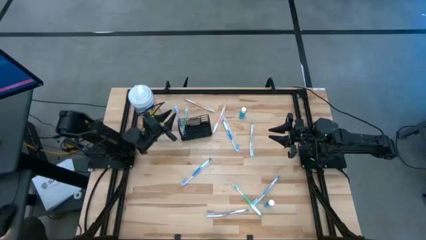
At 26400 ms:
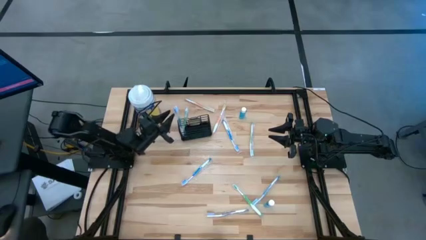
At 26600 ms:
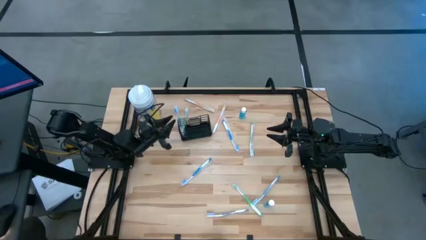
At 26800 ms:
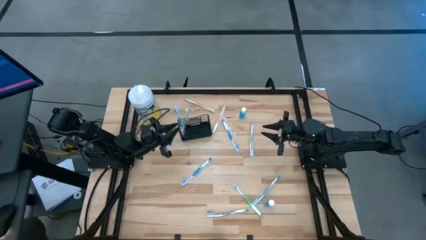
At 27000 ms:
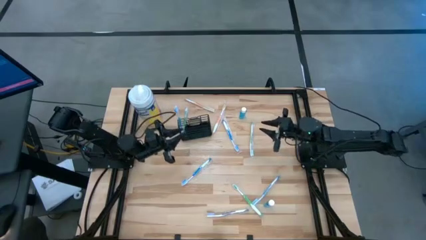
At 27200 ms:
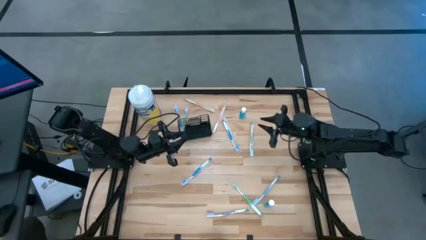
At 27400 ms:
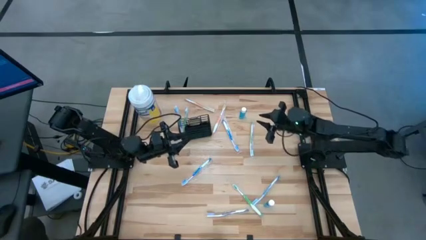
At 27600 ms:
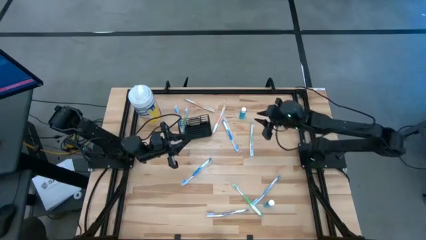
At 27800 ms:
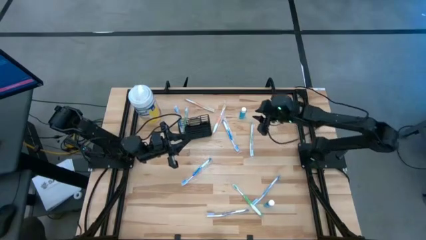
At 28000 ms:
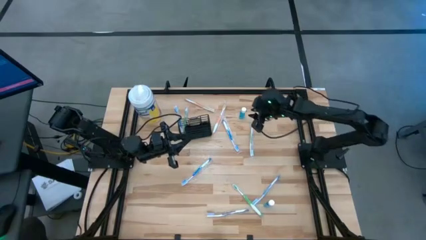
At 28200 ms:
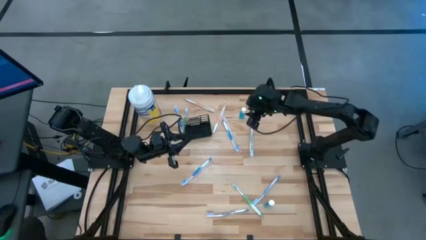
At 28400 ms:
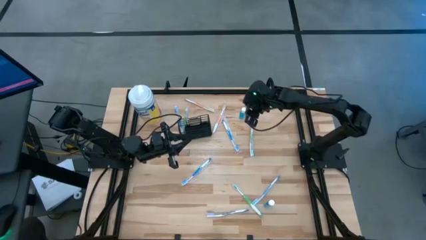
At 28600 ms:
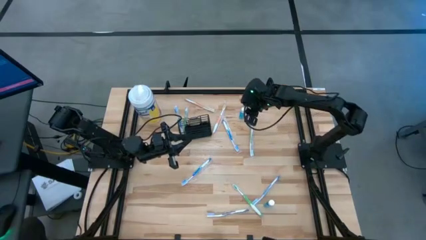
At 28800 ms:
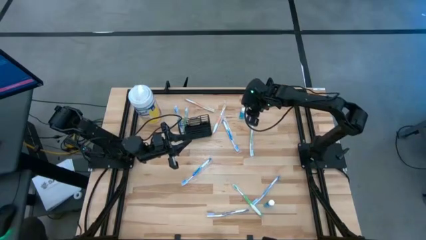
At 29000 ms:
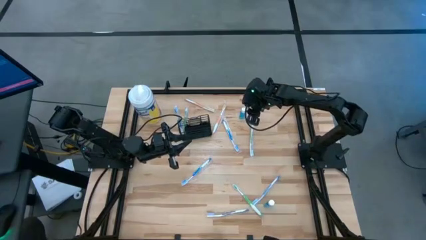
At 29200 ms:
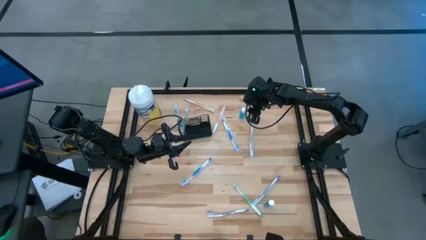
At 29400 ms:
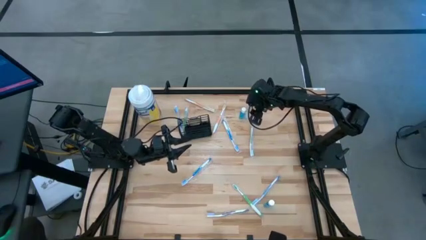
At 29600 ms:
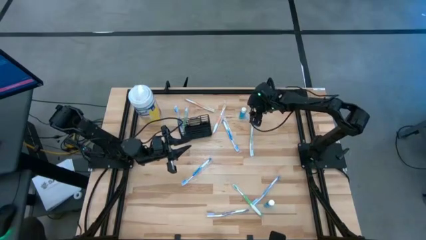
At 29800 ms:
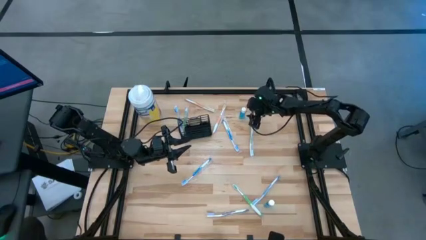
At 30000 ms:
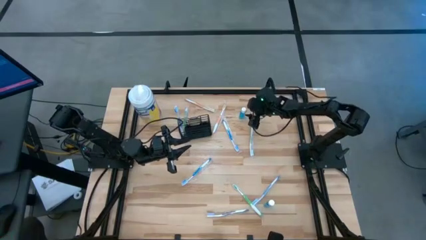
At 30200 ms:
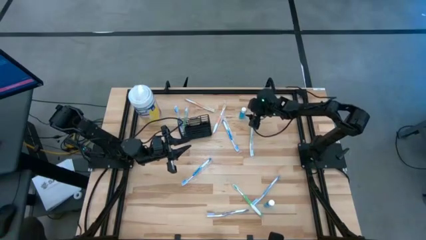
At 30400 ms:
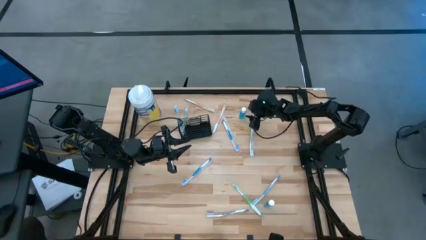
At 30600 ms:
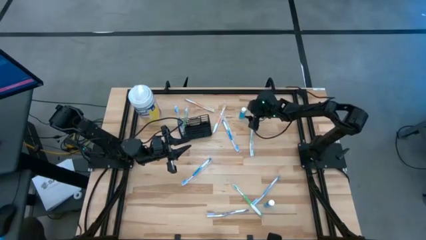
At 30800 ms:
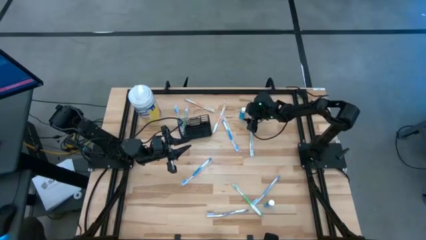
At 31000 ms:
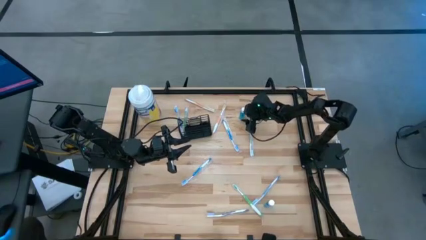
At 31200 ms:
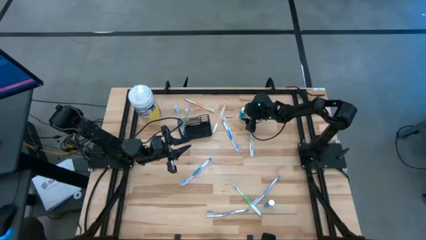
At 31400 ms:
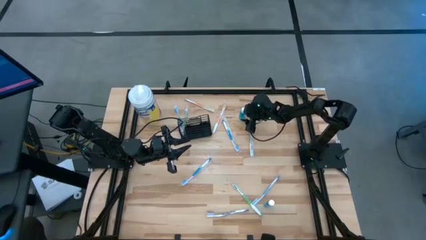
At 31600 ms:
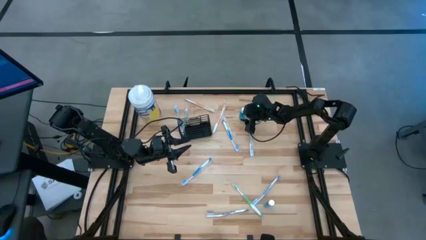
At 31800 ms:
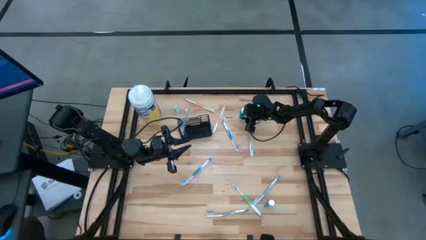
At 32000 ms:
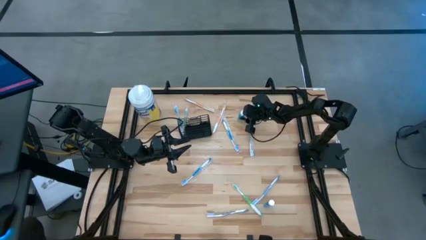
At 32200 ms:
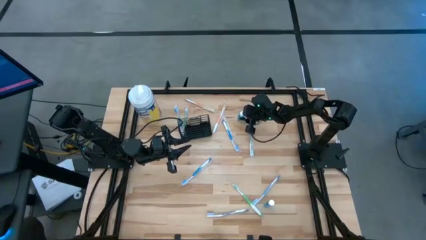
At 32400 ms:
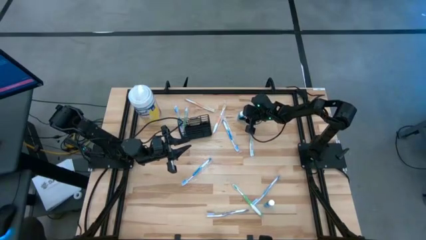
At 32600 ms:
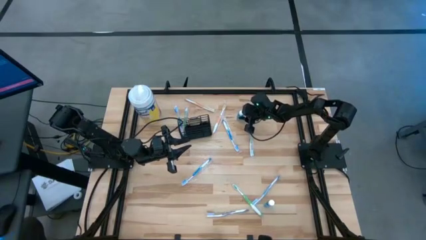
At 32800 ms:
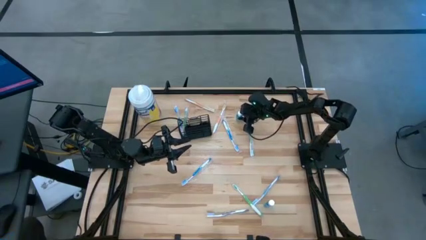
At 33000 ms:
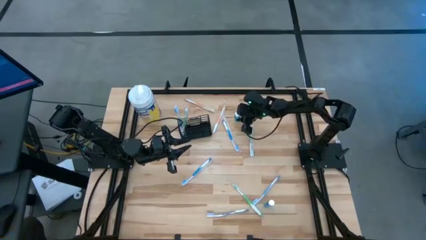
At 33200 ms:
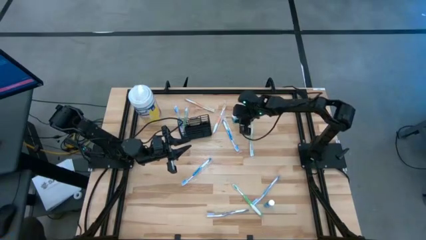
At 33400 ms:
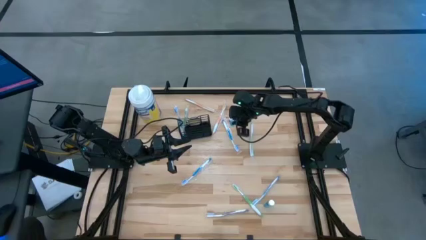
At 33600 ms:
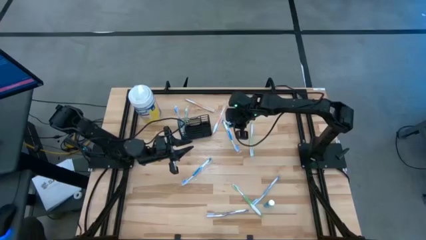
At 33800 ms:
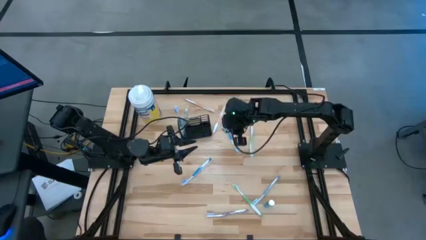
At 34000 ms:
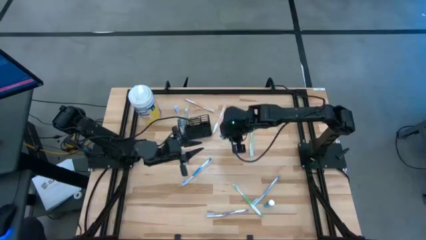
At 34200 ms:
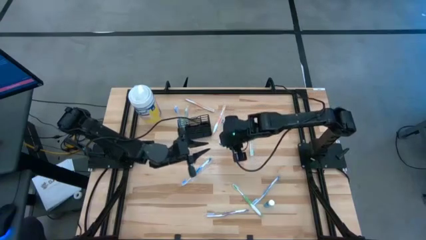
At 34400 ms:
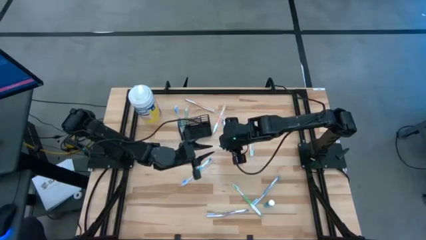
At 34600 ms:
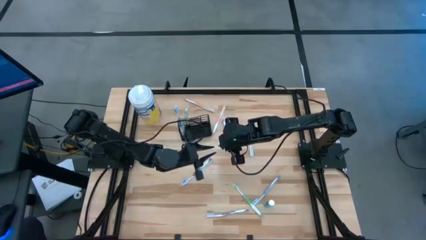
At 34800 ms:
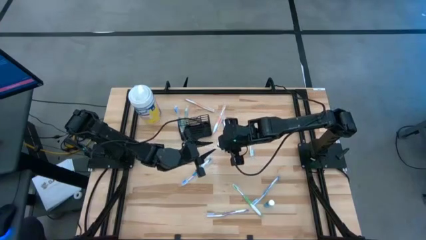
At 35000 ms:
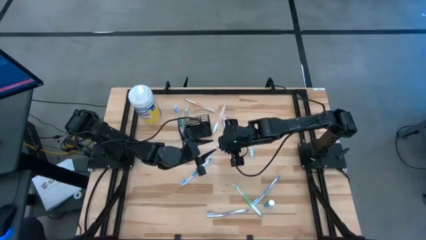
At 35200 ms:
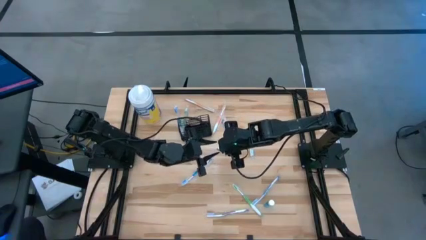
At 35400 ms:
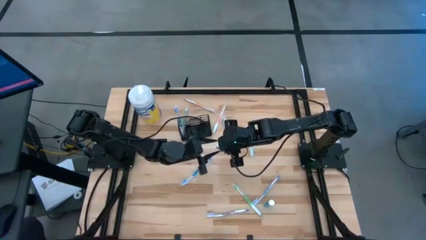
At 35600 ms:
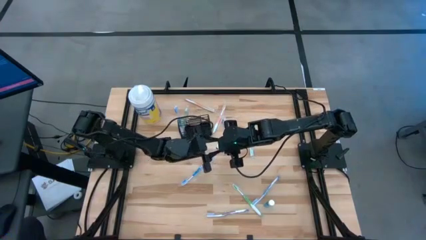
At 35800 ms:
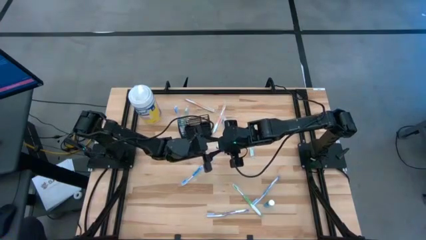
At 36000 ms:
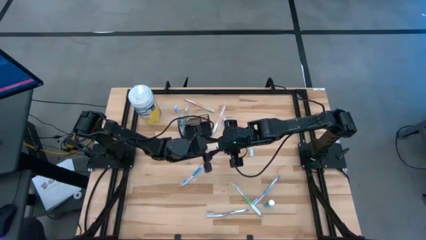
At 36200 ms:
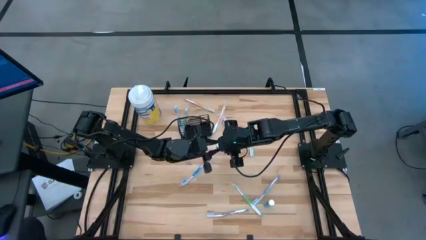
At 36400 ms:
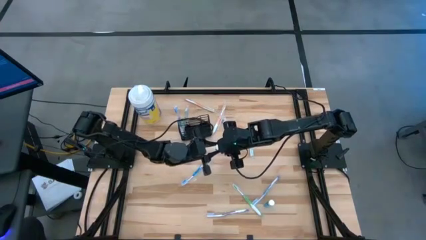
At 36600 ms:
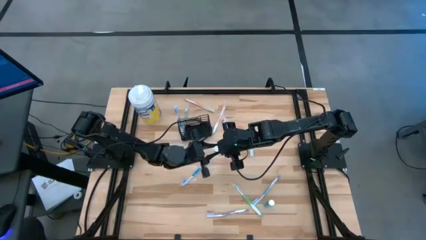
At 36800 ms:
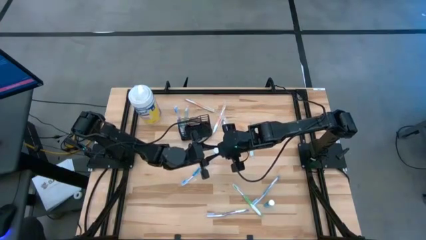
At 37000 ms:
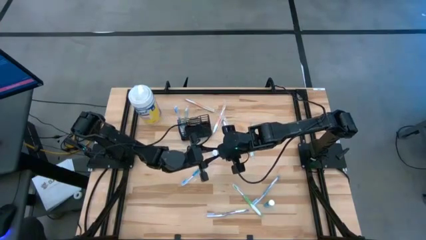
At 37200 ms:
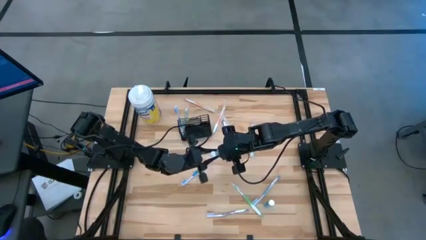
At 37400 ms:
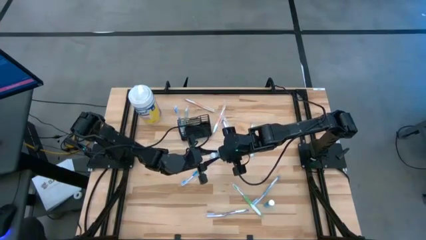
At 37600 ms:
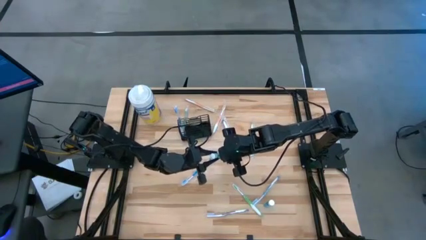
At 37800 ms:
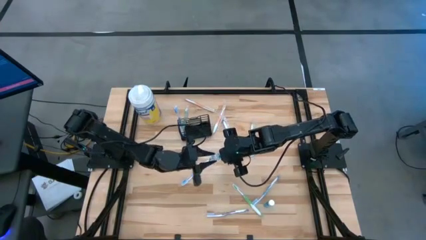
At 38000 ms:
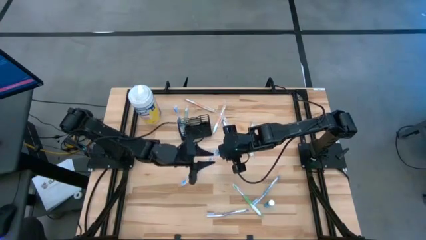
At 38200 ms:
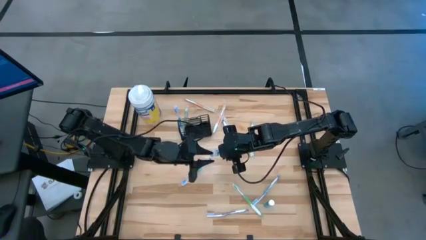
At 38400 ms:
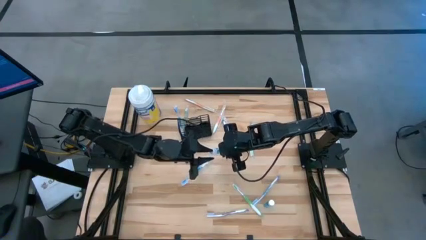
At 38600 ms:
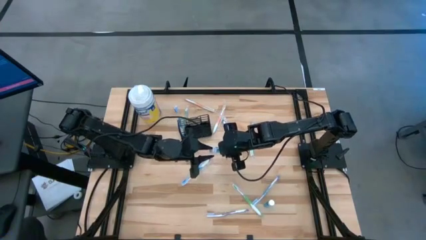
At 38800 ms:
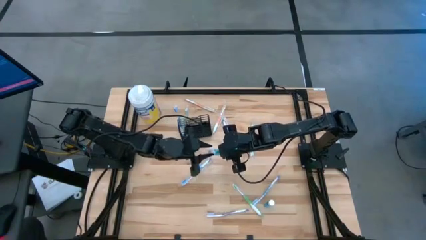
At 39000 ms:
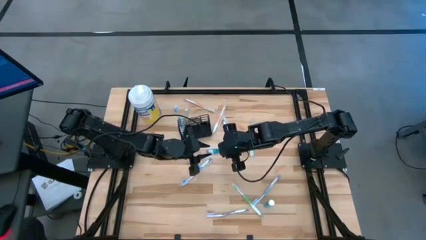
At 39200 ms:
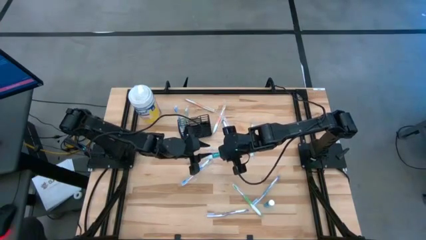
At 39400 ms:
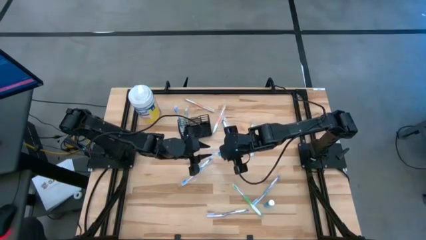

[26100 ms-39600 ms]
Task: Pick & Place toothbrushing station
Put the top mouthwash bottle into the mesh organizer
